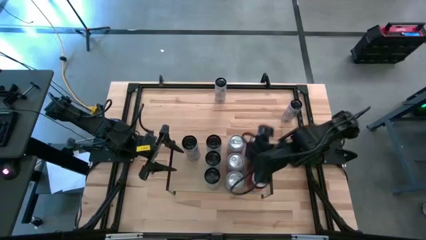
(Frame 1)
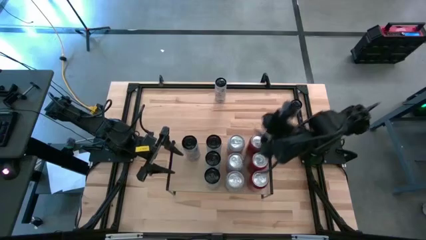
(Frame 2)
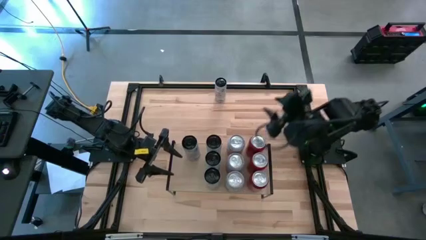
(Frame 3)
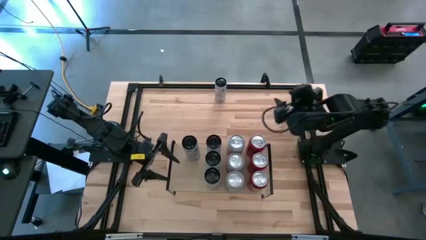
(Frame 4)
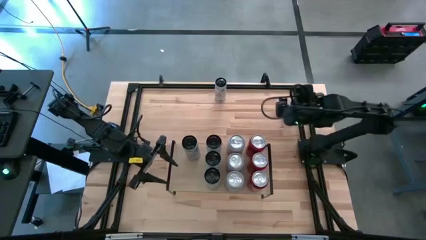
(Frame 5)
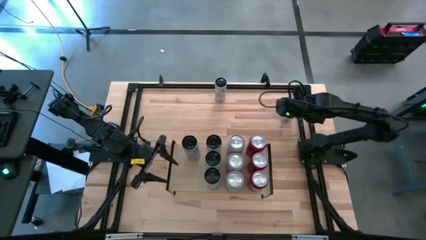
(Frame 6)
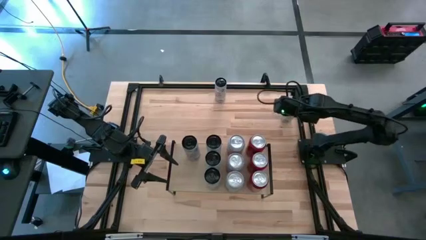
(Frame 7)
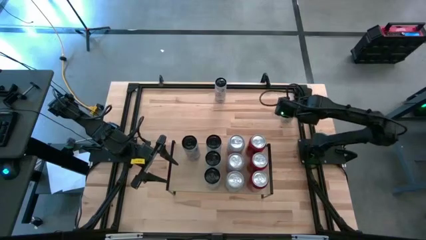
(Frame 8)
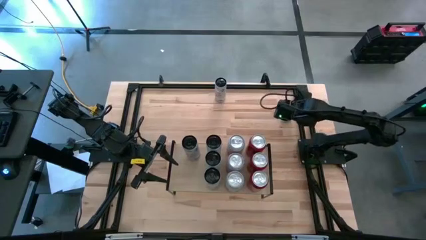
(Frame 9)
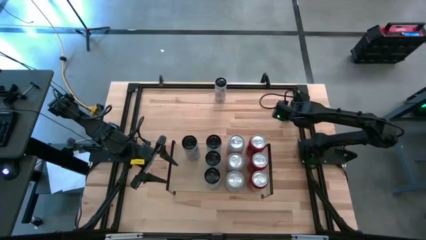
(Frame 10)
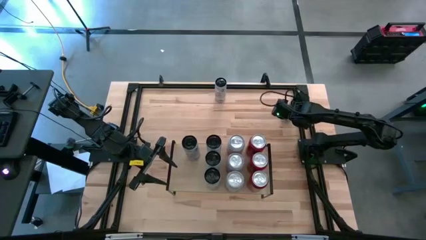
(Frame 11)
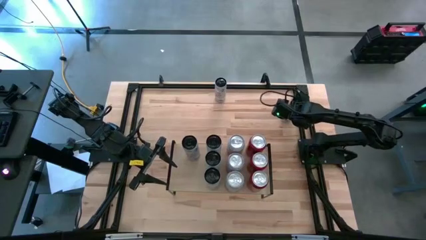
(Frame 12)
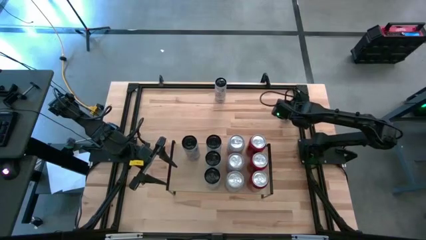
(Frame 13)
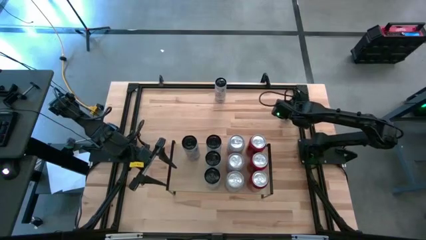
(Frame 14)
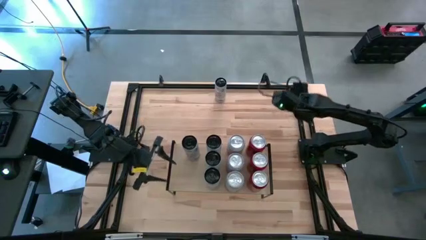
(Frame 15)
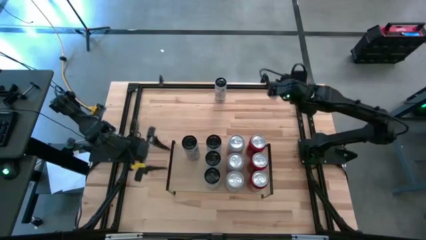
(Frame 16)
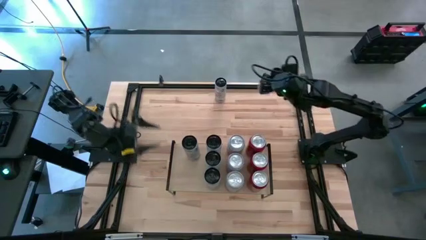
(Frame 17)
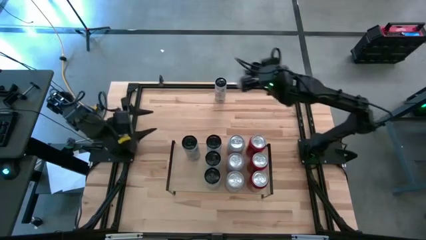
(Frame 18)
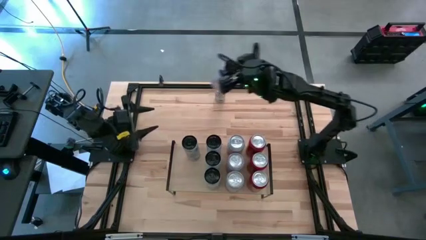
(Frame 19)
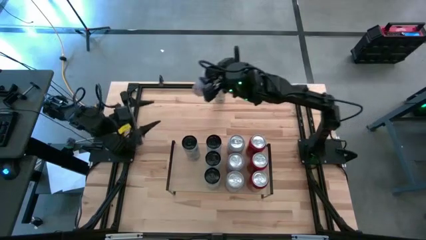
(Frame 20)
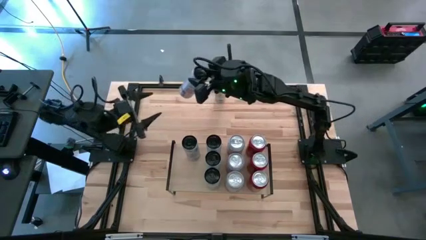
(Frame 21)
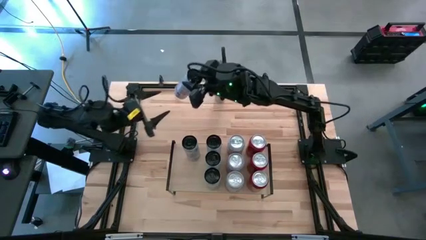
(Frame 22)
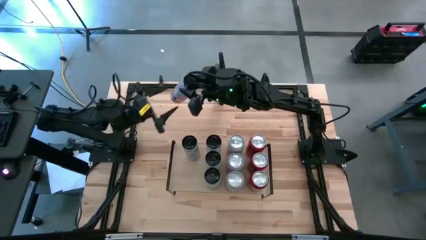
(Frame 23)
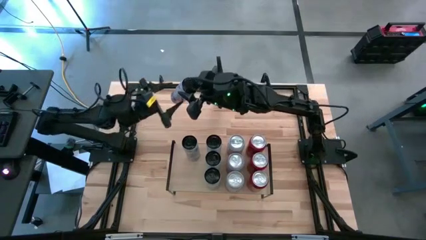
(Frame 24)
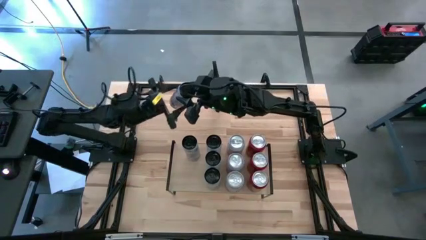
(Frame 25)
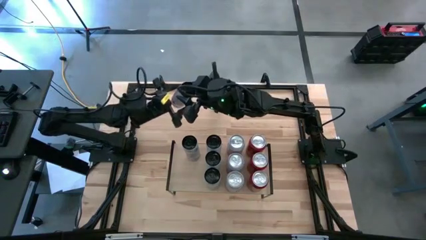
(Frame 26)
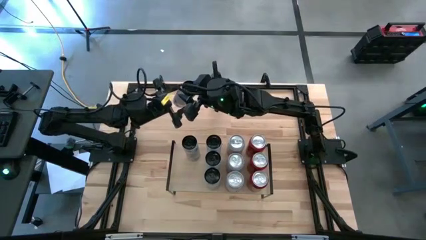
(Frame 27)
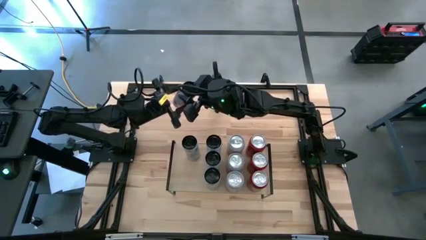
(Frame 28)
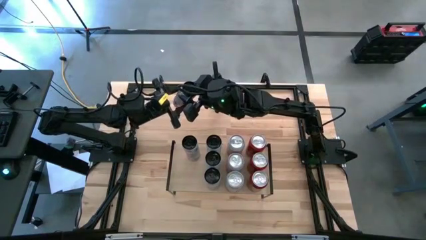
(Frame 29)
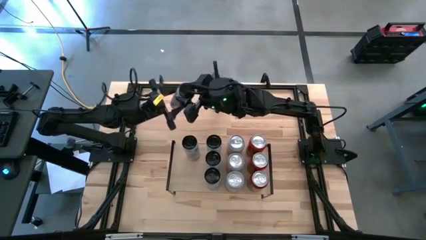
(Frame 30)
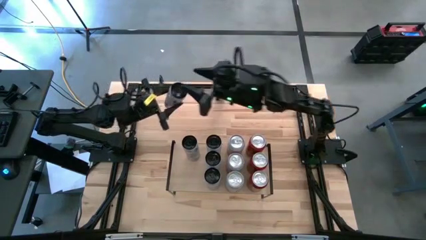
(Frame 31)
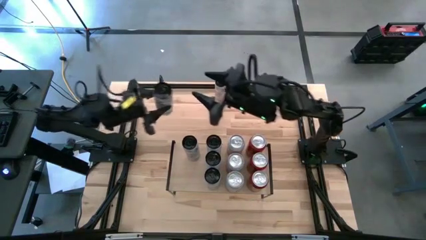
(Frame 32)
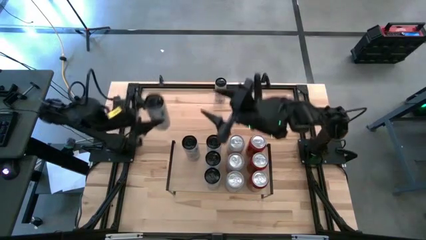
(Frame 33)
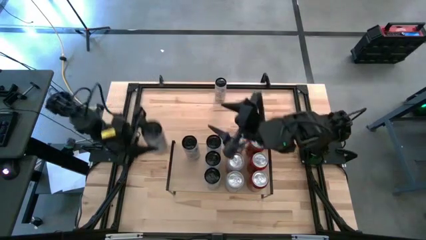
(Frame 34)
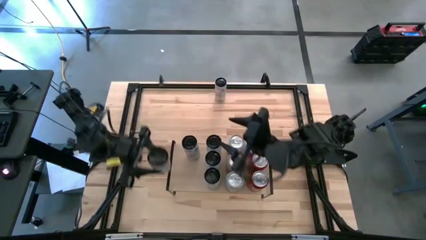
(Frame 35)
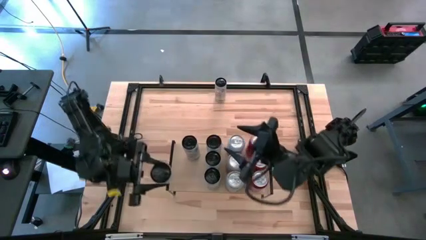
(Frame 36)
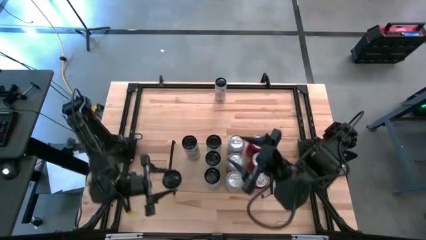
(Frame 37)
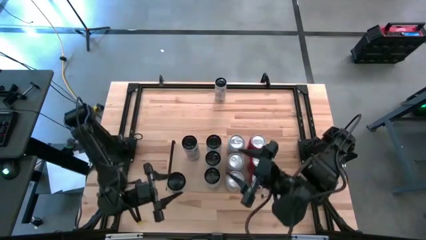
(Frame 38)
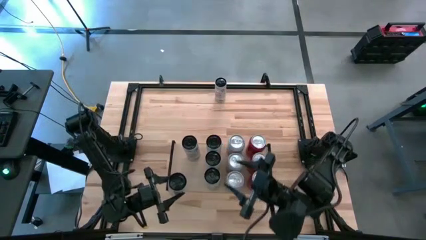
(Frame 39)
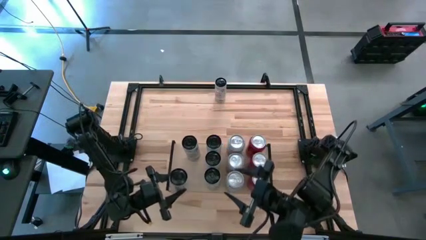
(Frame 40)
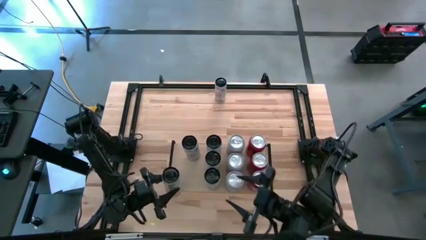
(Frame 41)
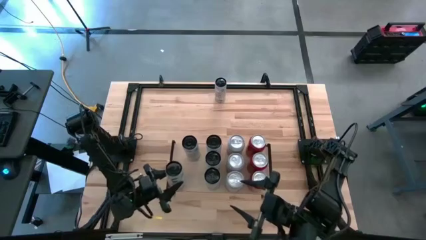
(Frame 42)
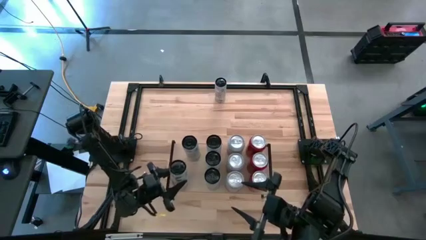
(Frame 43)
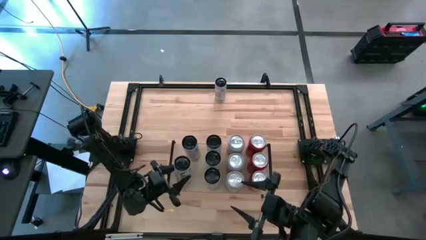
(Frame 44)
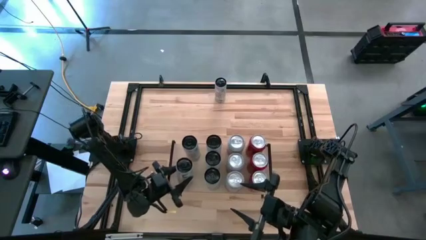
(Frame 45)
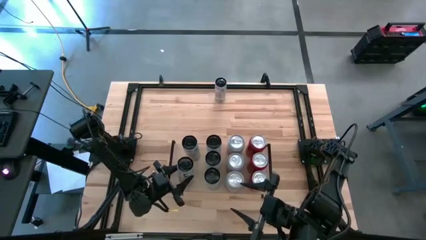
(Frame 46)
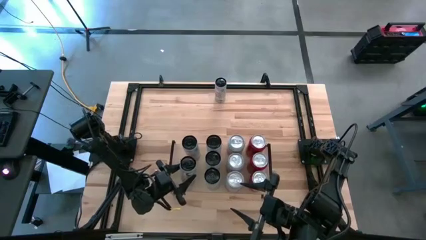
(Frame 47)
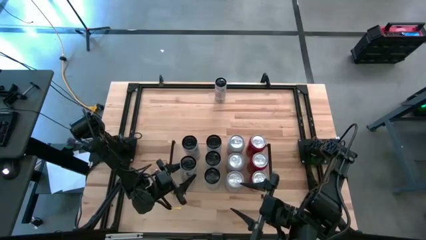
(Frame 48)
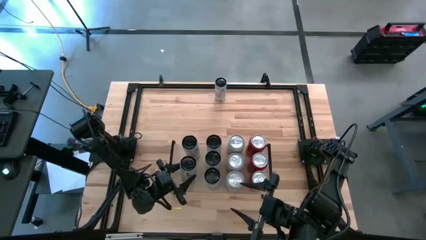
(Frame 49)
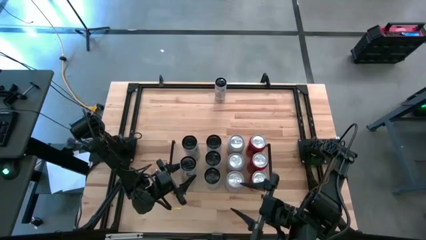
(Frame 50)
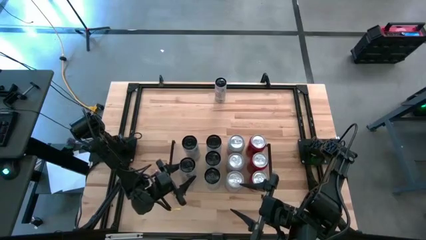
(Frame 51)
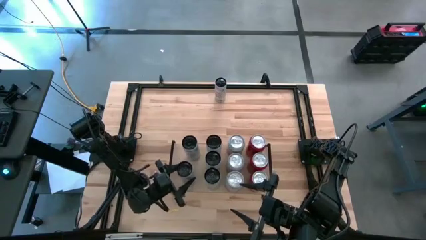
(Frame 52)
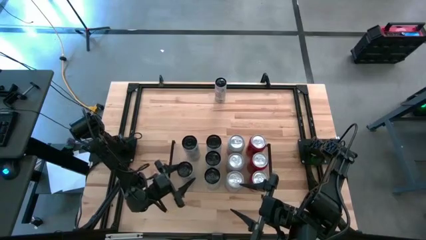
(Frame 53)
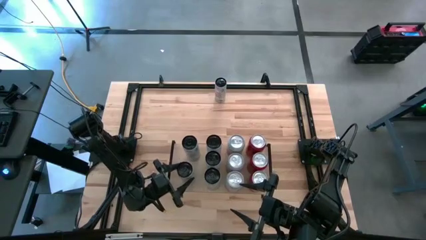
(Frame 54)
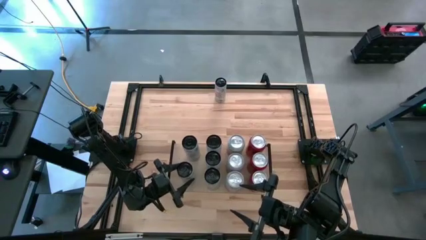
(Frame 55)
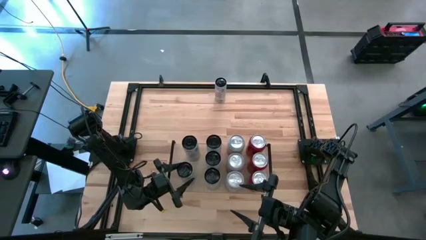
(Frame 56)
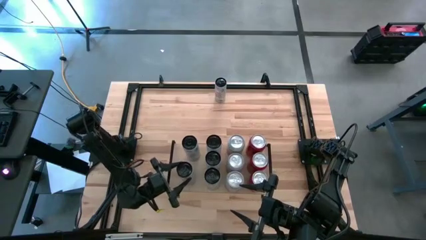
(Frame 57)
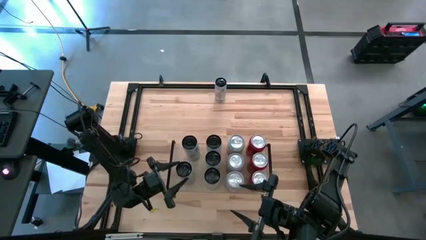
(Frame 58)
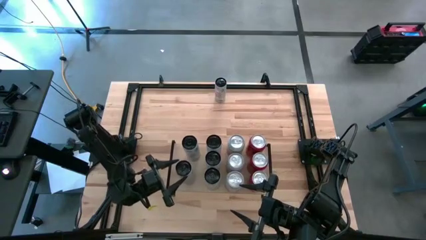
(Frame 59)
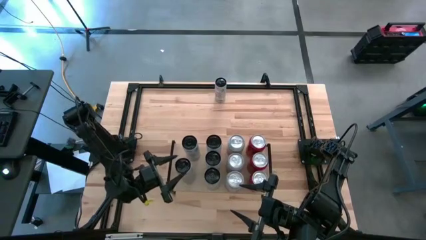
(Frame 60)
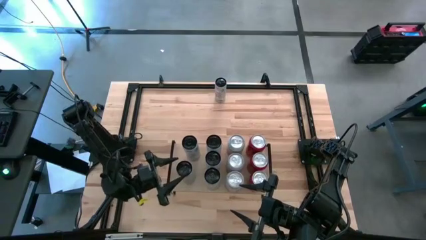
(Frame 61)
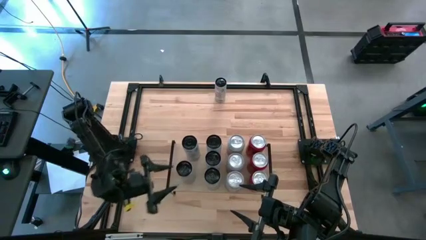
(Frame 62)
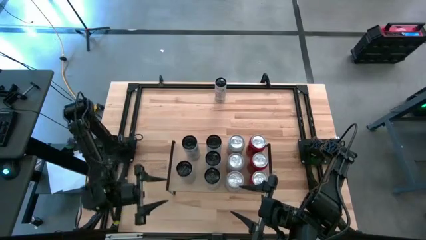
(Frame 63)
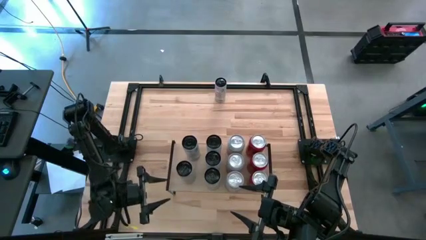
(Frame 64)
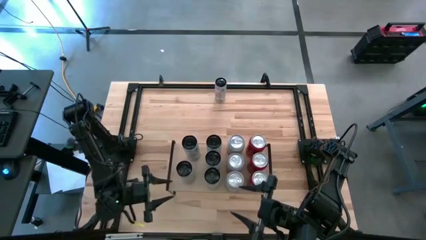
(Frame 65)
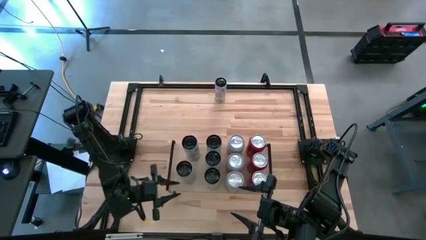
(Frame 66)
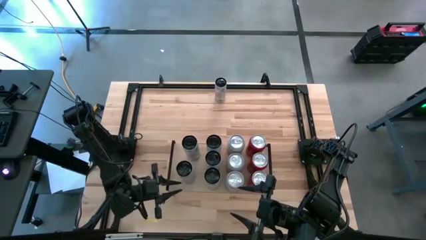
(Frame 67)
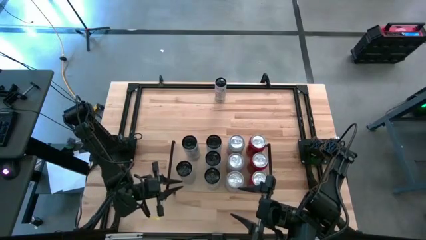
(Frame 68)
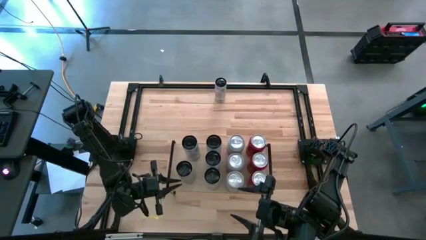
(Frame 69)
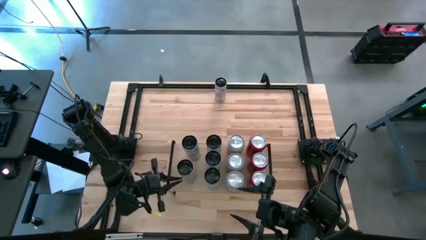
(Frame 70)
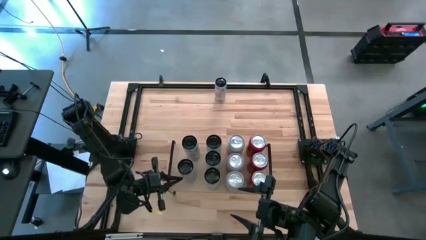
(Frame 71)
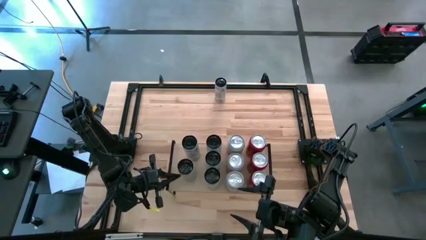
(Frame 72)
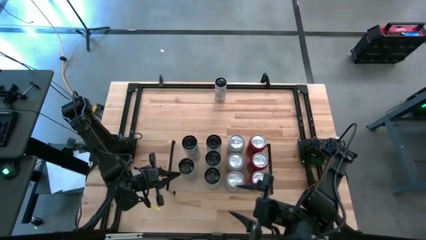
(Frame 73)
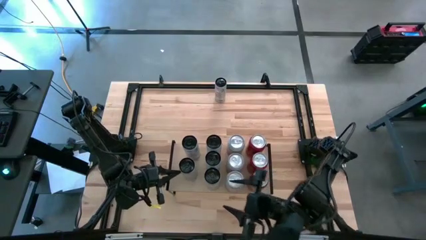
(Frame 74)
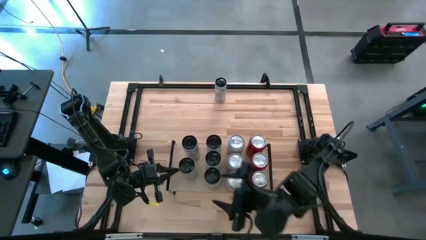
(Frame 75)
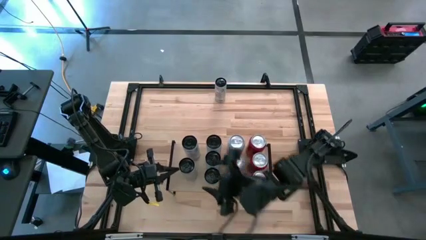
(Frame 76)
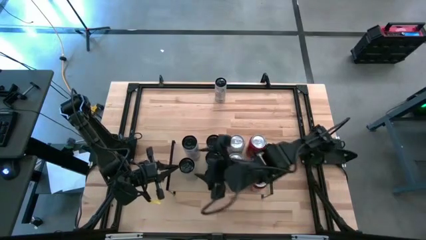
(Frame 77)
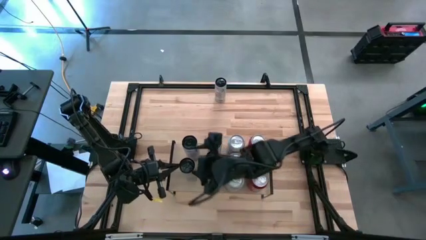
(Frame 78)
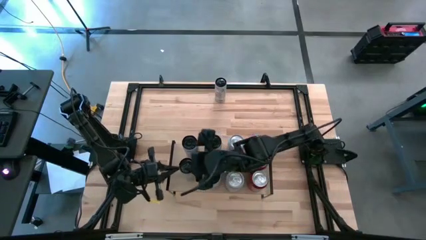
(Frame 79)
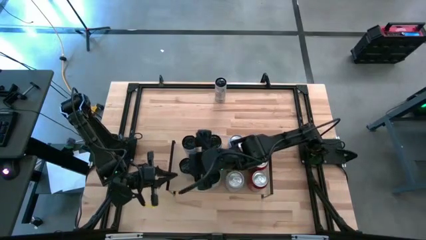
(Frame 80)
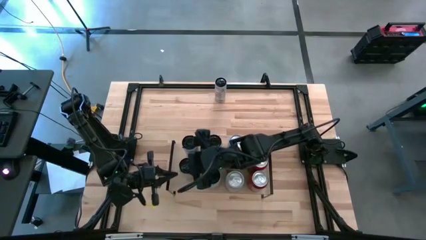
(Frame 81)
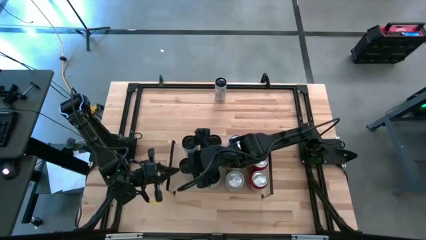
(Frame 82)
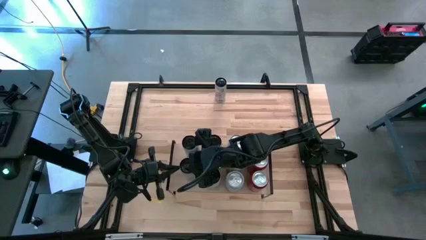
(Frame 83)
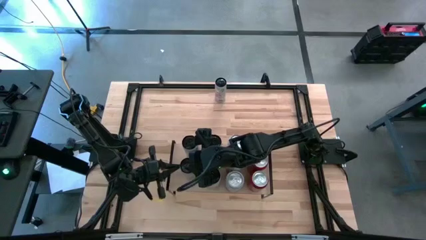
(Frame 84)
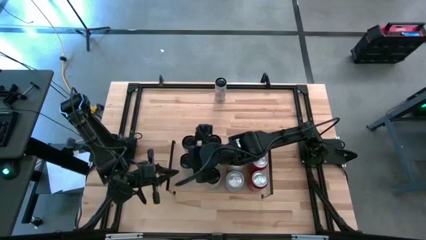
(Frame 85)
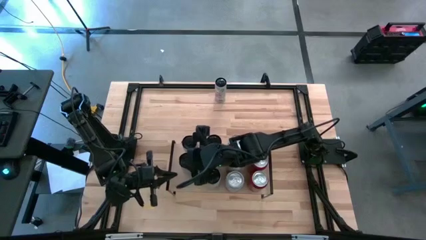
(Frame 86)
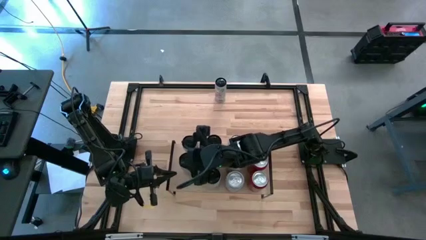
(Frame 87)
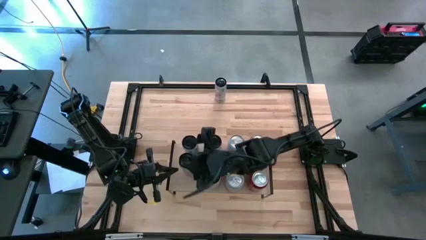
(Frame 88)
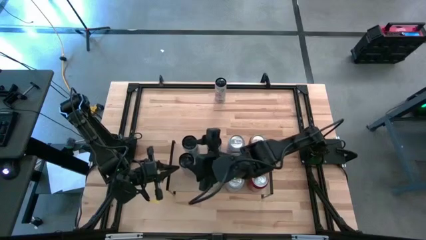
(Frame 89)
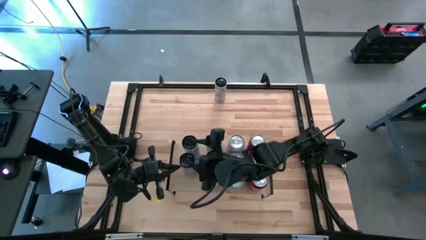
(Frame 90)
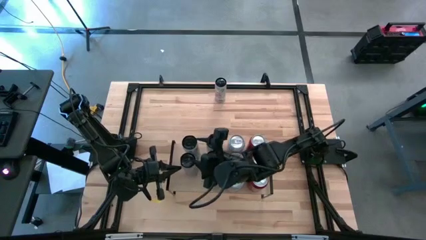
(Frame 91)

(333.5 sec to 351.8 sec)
Task: Place canned beverage on shelf
Put the right white-pink soda can on the shelf aligned with the other white-pink soda cans
